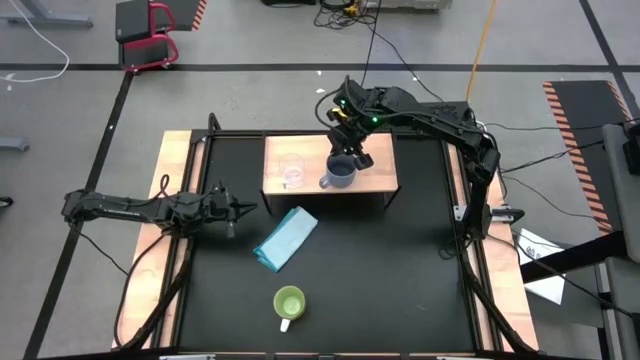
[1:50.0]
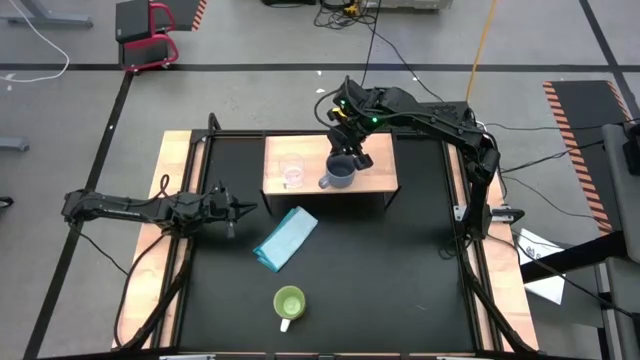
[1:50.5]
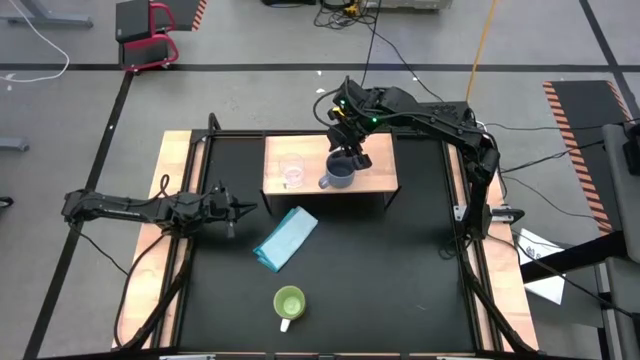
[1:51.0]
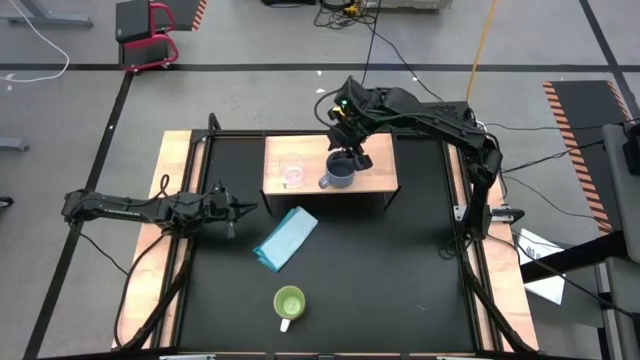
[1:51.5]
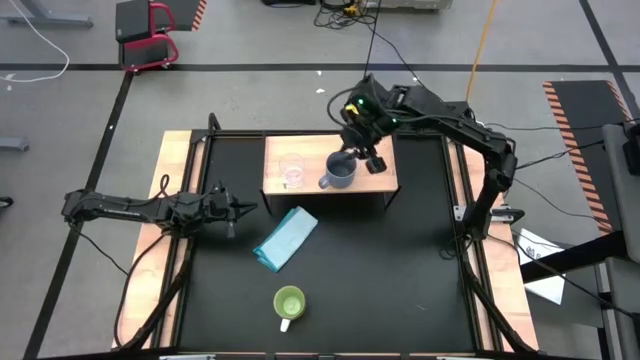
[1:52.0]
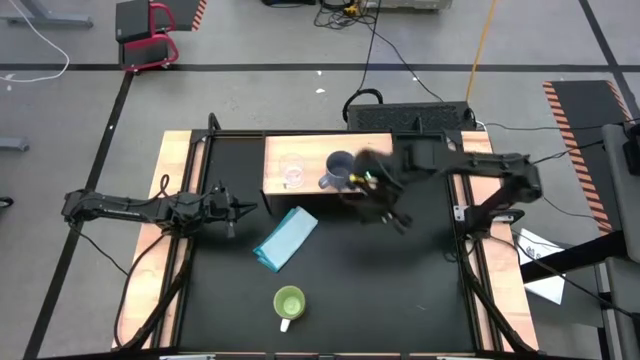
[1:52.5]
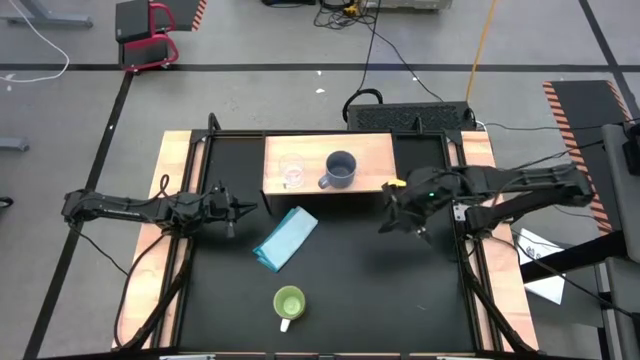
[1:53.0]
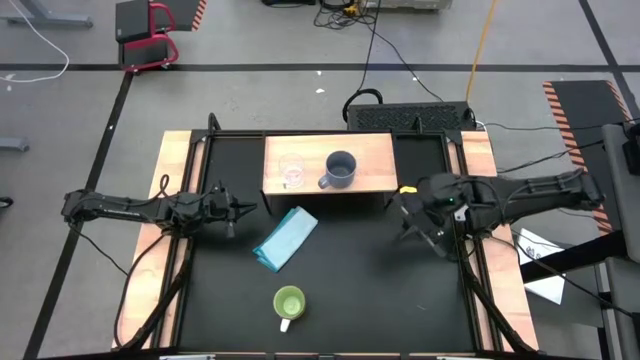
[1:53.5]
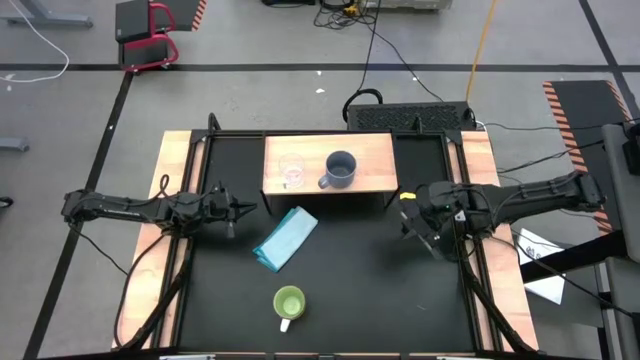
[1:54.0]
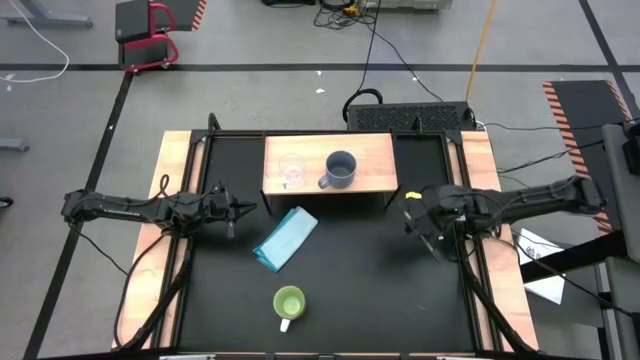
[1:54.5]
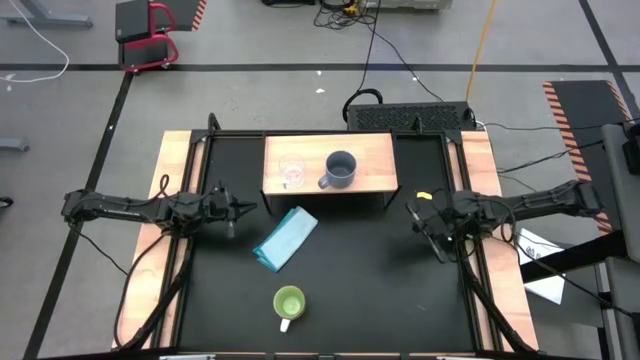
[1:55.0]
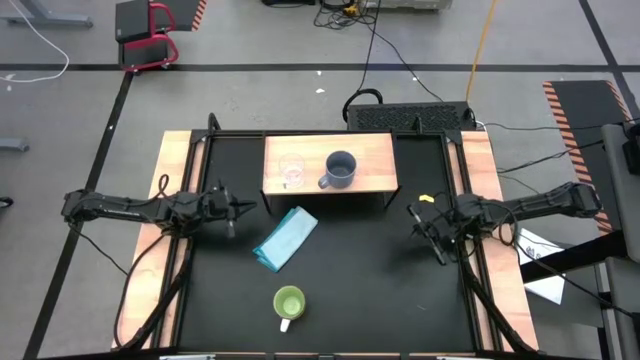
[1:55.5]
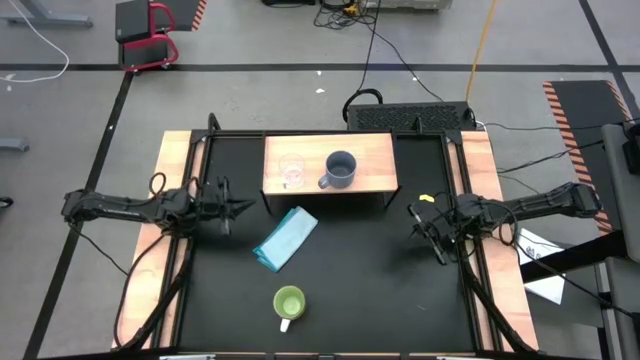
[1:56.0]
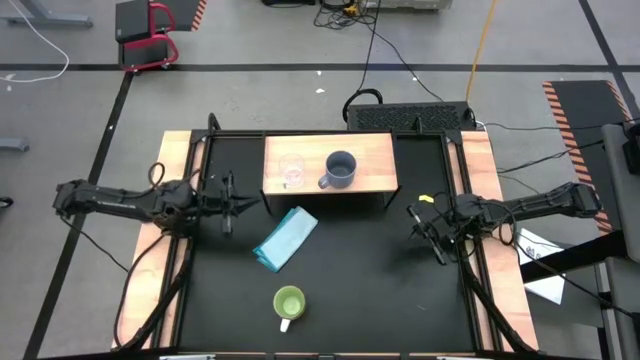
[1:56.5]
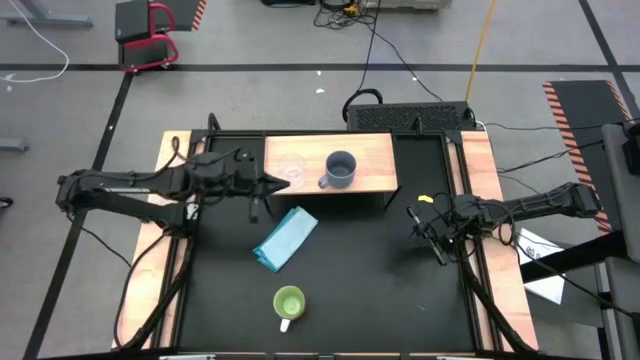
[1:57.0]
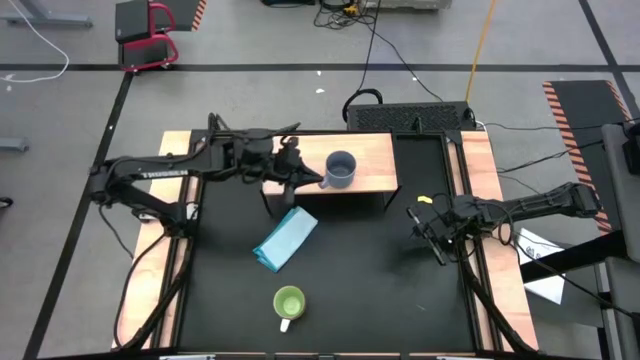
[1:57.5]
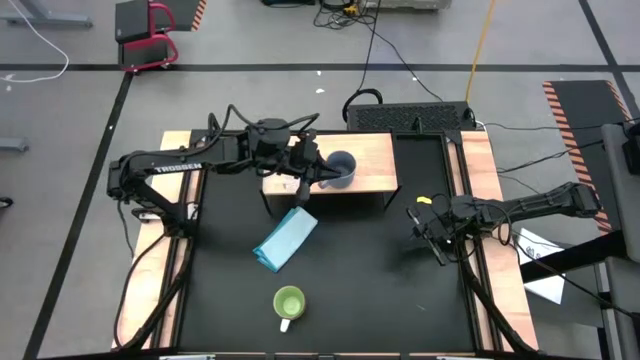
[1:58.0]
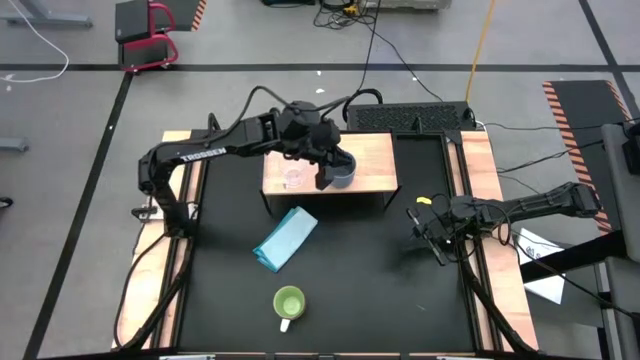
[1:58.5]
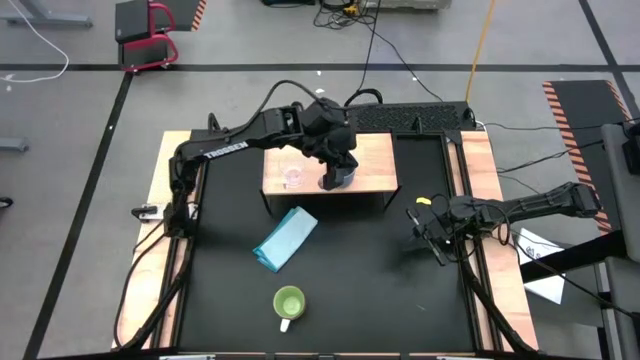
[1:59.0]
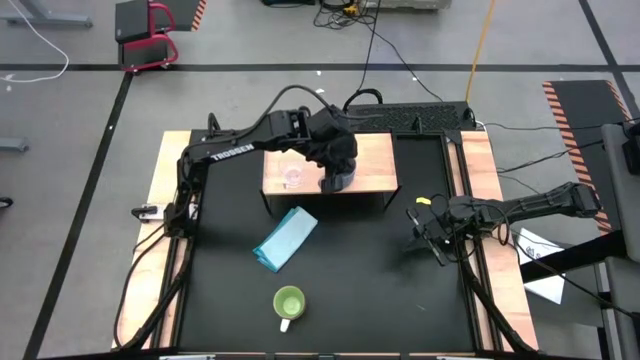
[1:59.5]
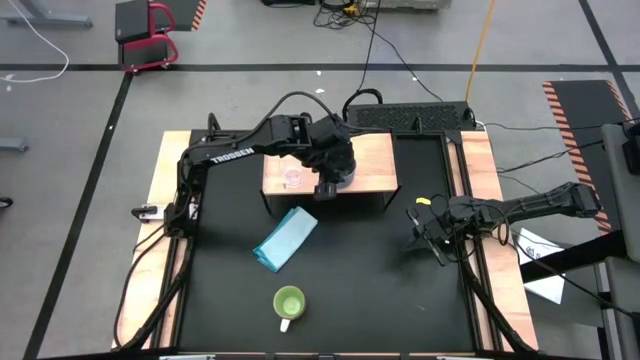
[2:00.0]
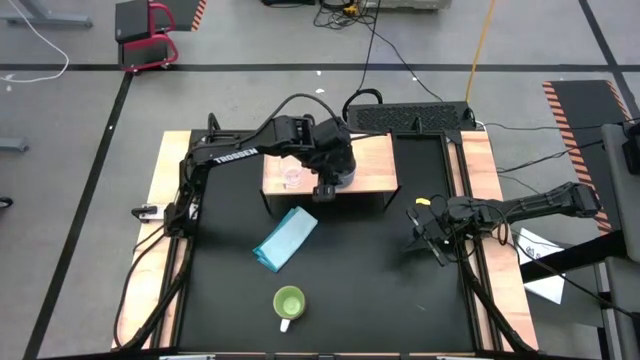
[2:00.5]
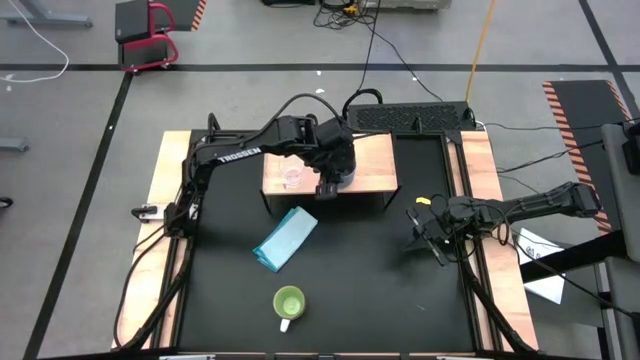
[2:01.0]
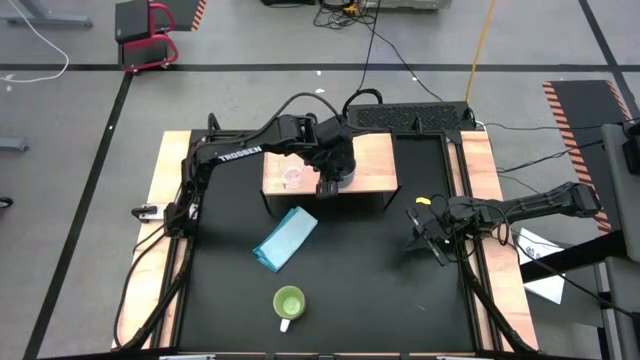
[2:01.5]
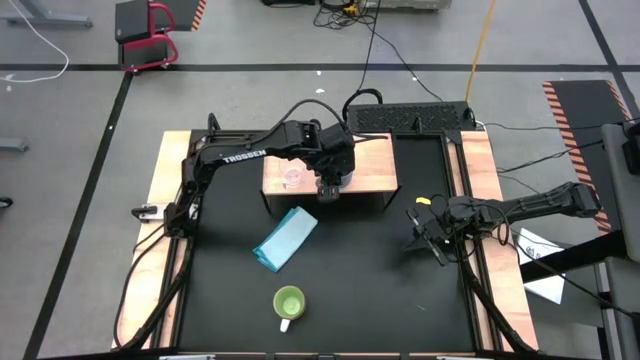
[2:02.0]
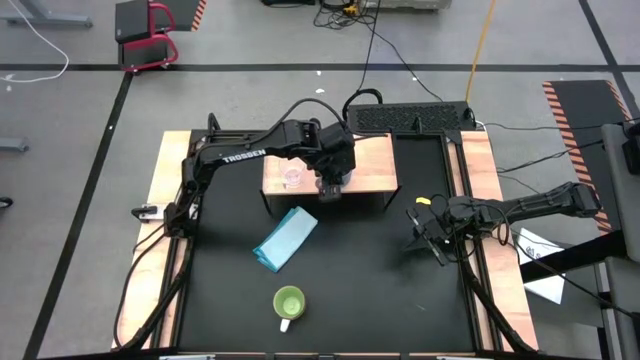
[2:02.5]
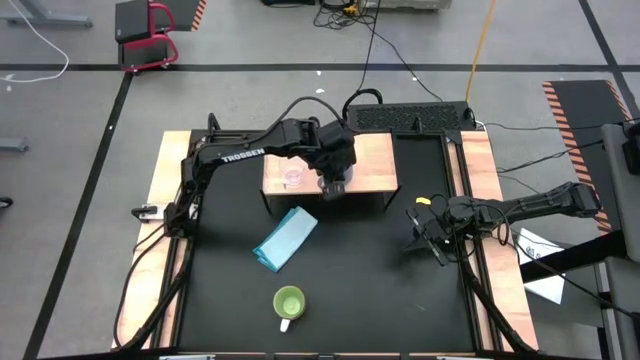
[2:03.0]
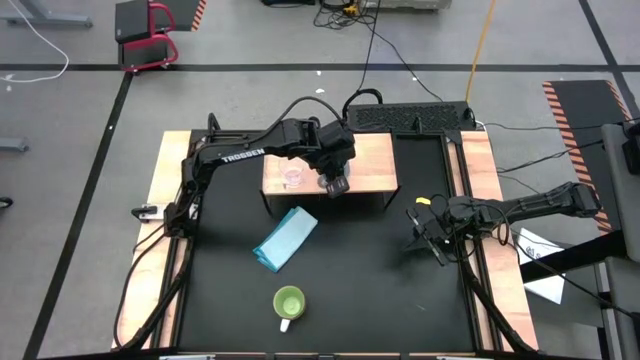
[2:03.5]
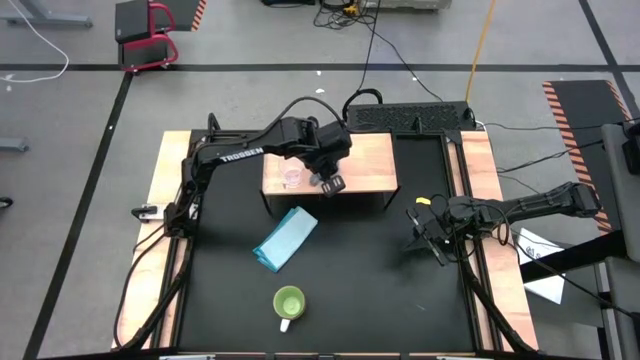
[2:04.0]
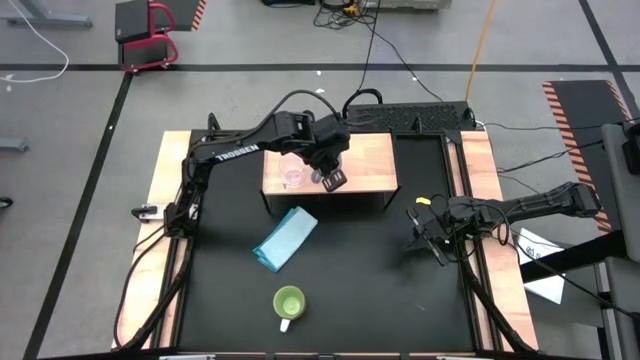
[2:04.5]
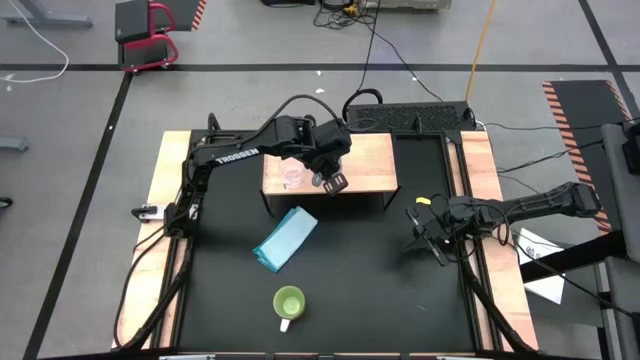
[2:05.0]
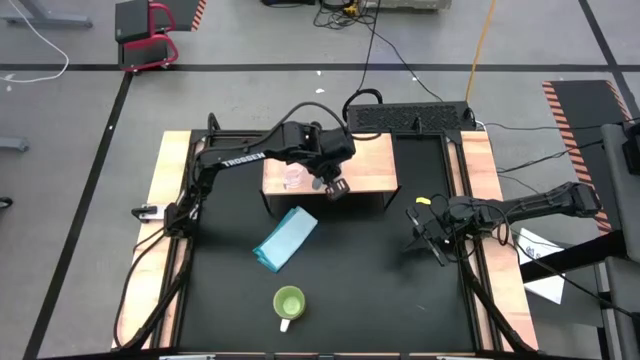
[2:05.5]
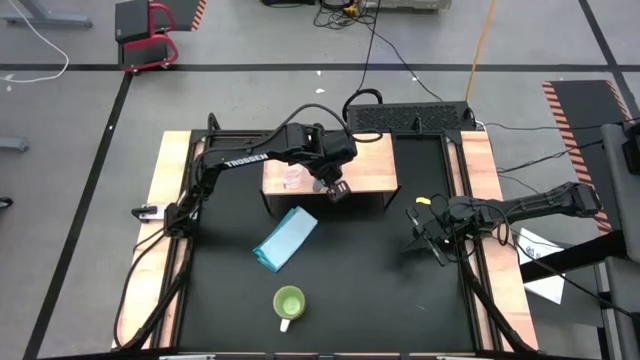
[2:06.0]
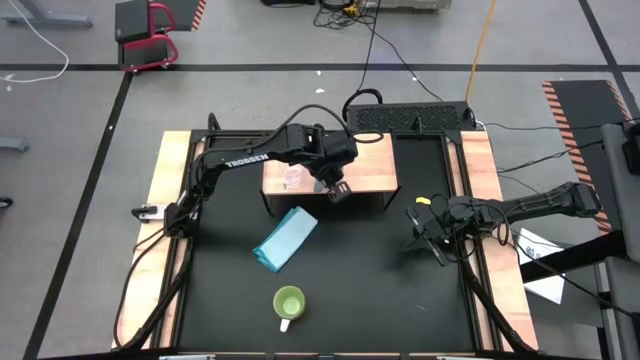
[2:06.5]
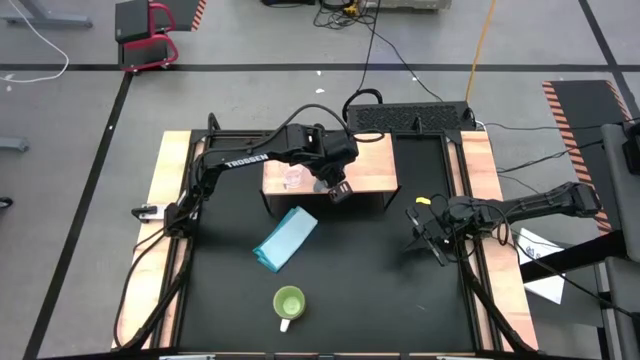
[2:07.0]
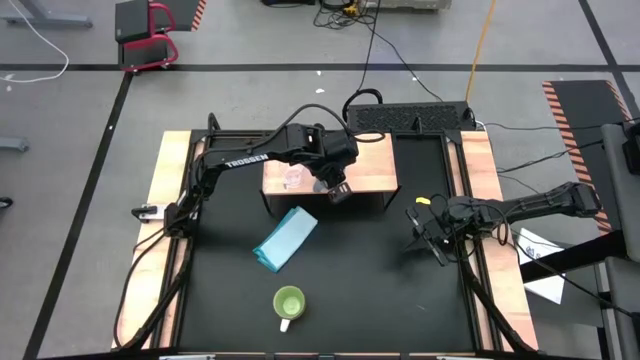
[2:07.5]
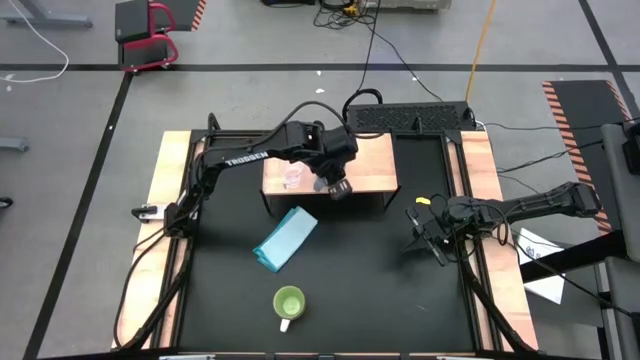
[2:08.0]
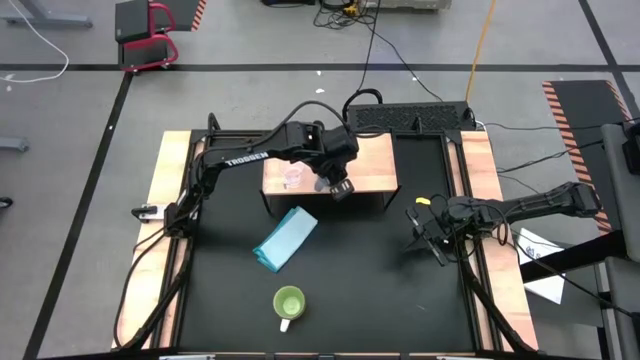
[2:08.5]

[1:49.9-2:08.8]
Task: Stack small to large cups/mugs on shelf
Put the gray mug on the shelf
